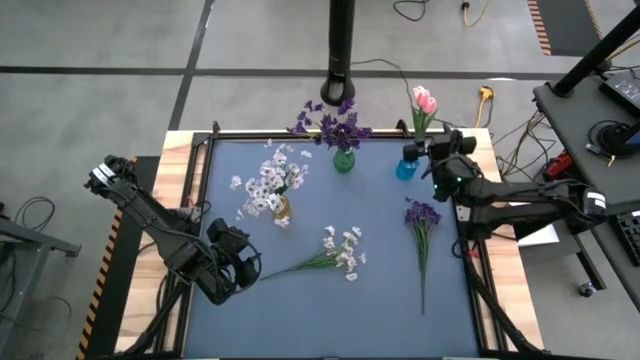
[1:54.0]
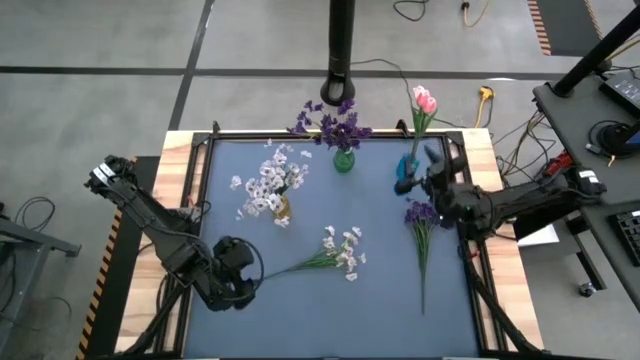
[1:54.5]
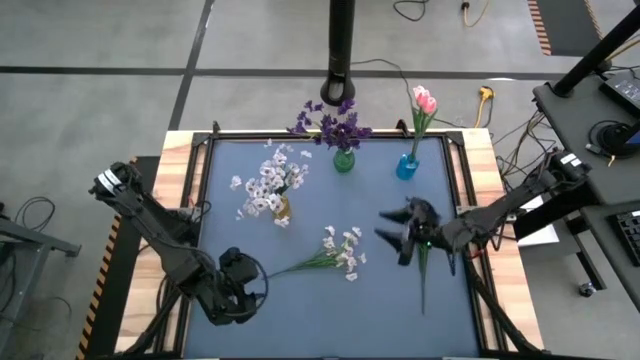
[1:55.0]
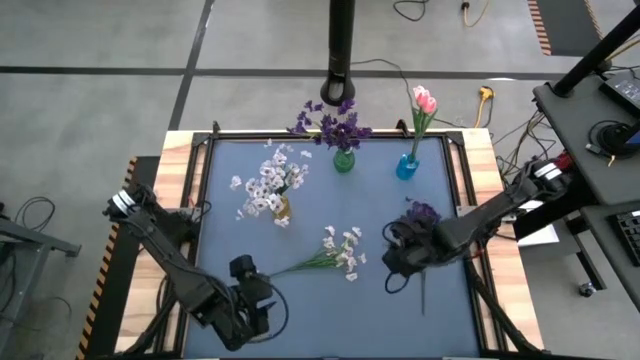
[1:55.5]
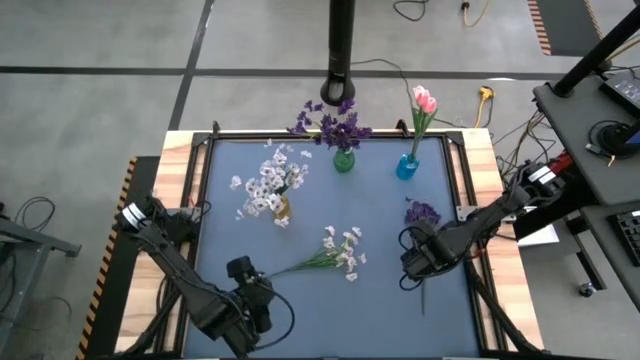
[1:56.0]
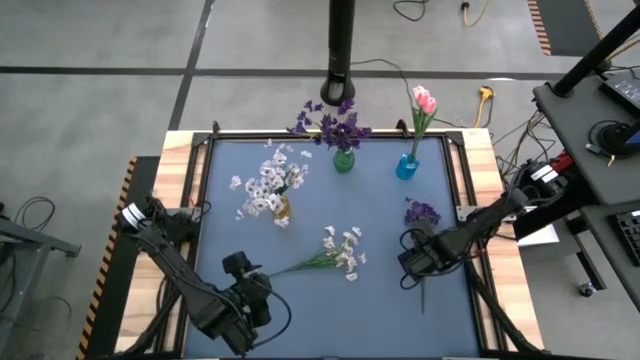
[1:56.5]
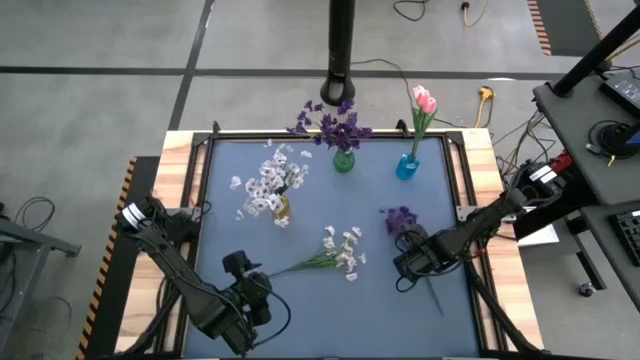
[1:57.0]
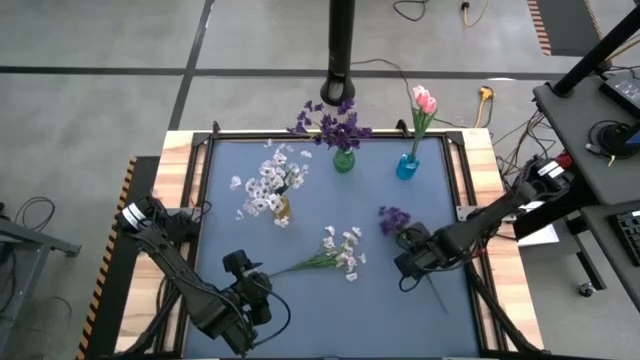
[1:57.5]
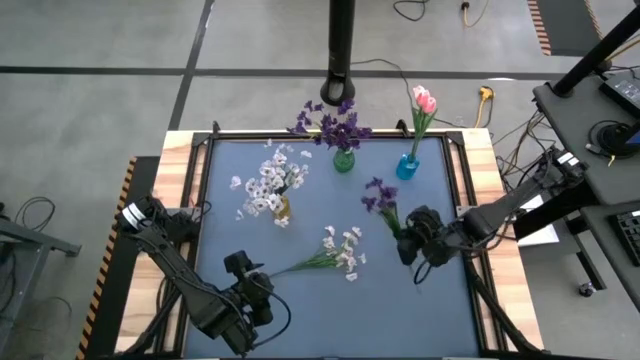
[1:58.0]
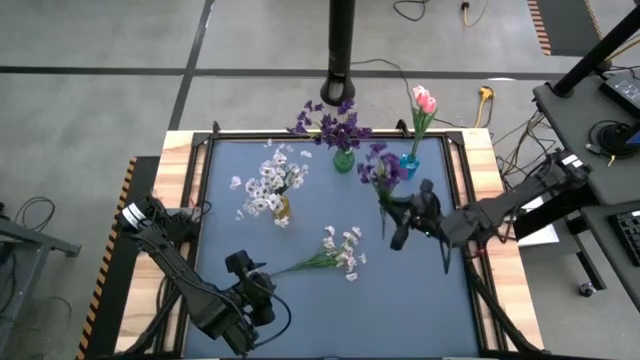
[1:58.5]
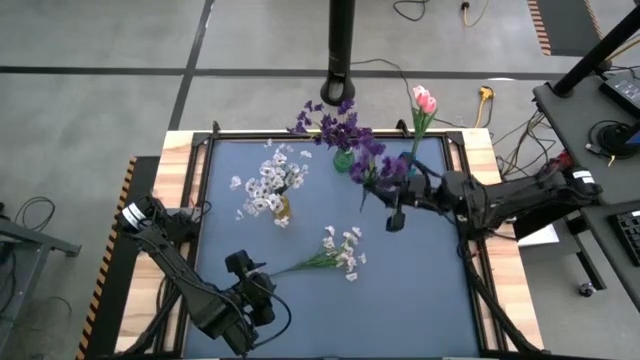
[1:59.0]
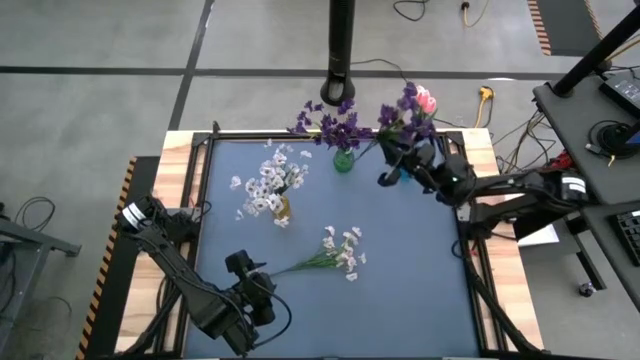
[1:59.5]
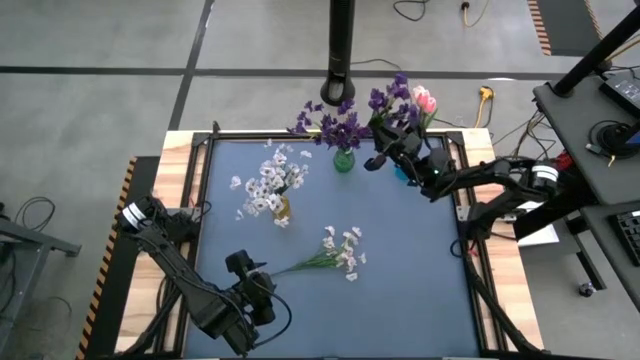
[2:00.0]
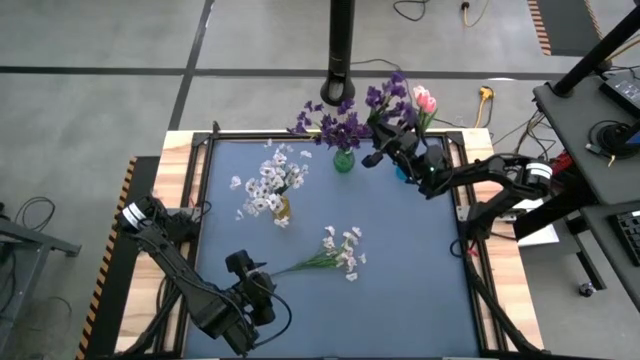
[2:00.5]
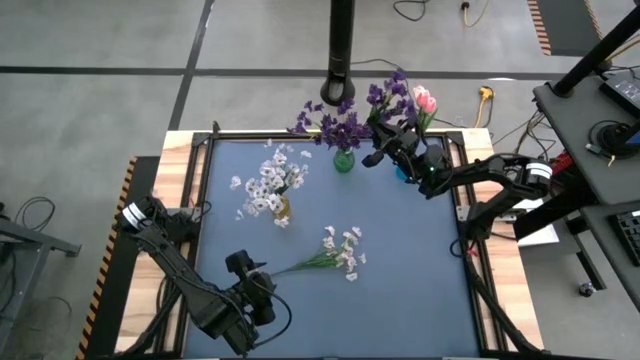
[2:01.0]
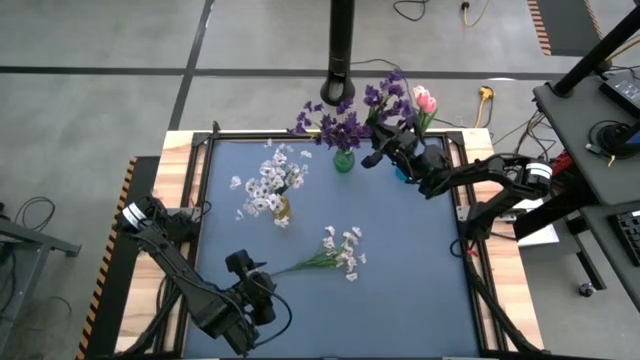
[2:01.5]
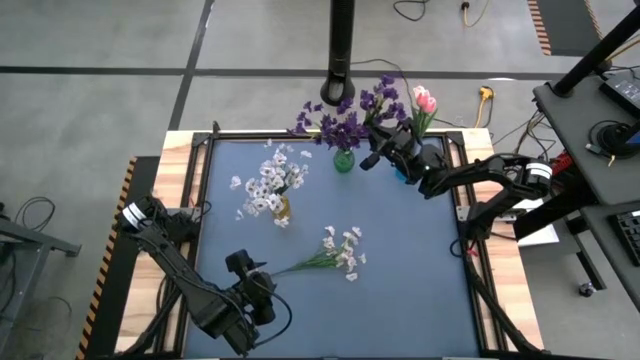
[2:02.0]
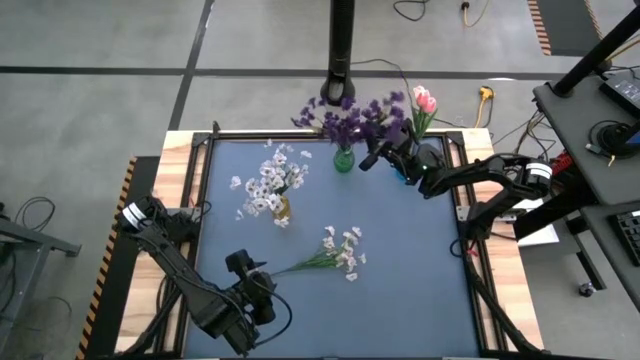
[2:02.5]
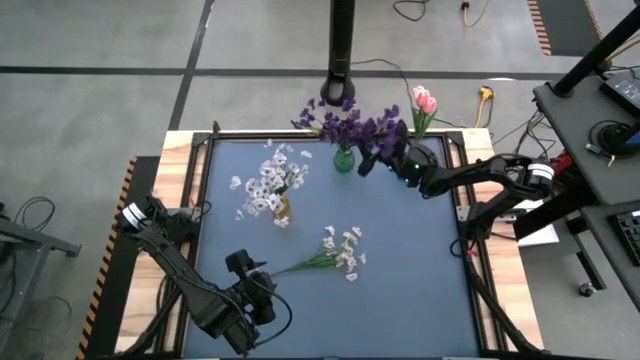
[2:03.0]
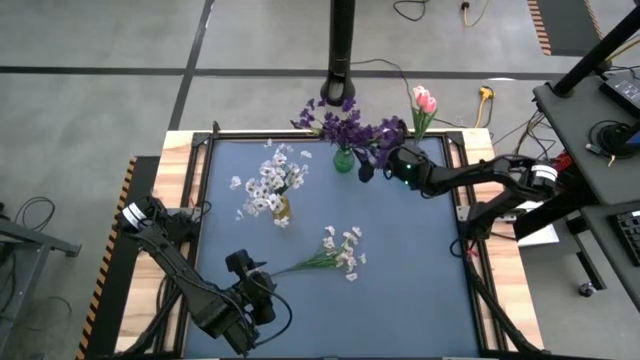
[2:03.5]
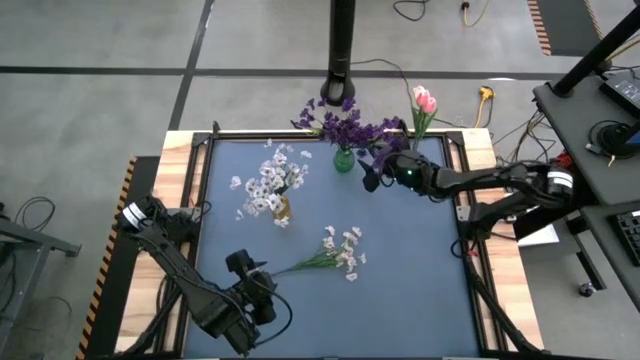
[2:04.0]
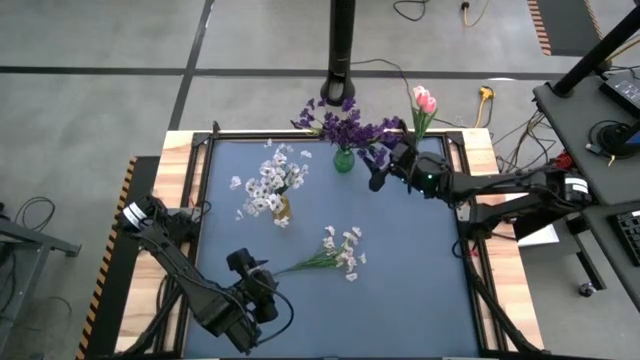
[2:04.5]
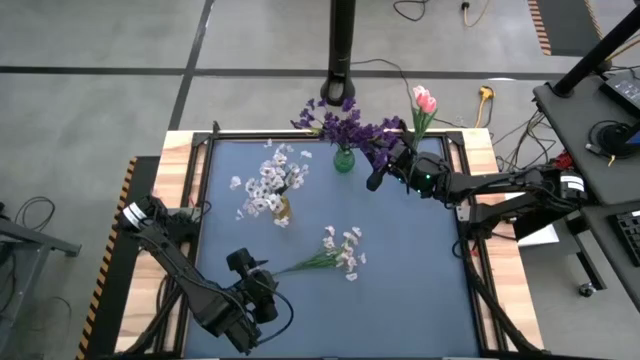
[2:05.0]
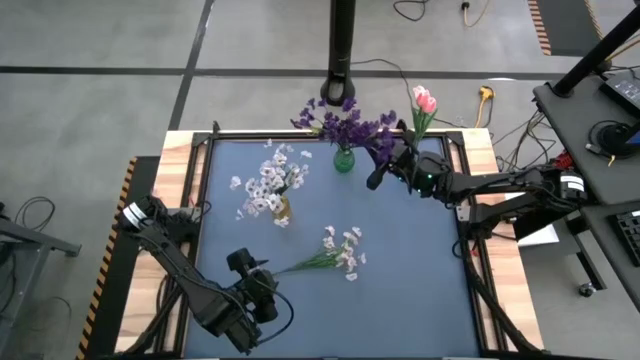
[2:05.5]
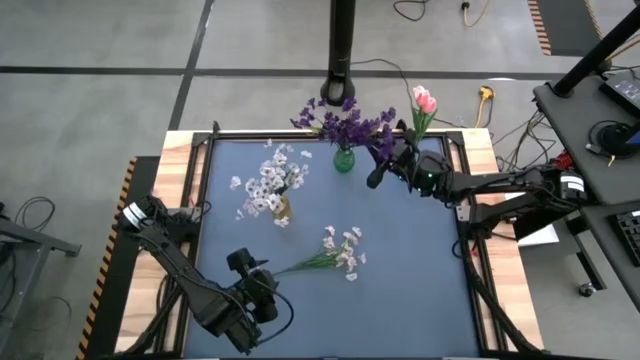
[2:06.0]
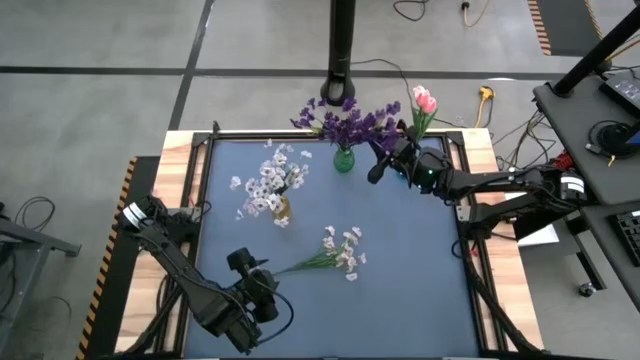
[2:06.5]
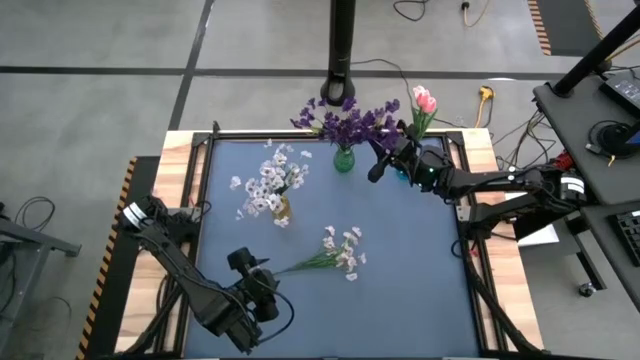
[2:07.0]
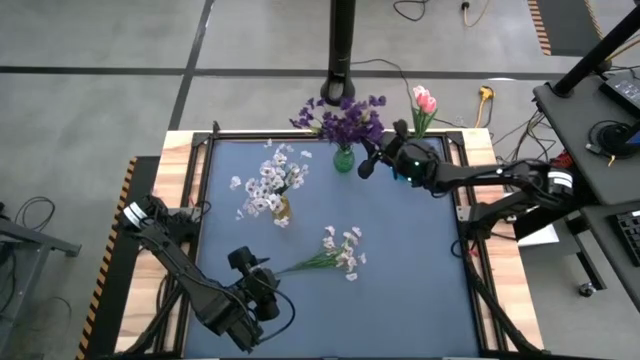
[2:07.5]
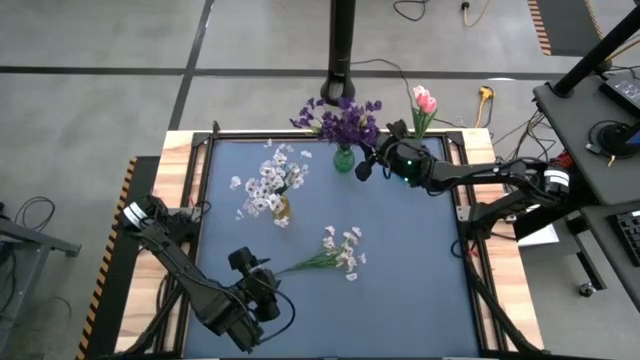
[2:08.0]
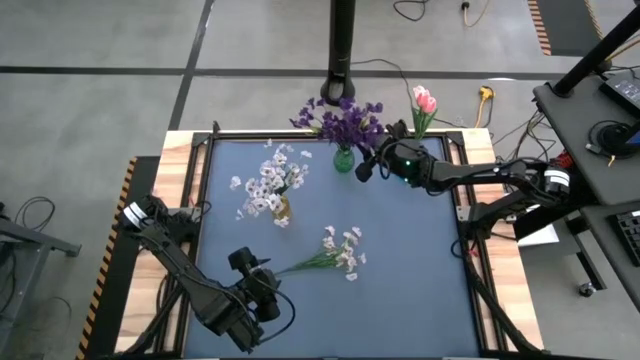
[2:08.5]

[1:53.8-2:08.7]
Task: Sort flowers into vase by color
Put the purple flowers into the green vase

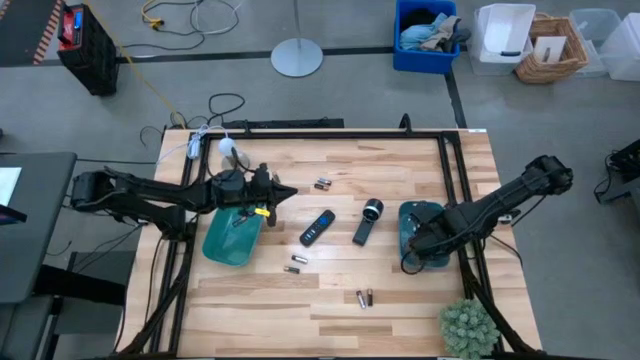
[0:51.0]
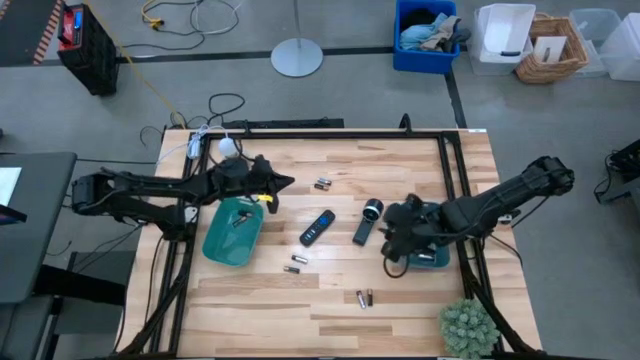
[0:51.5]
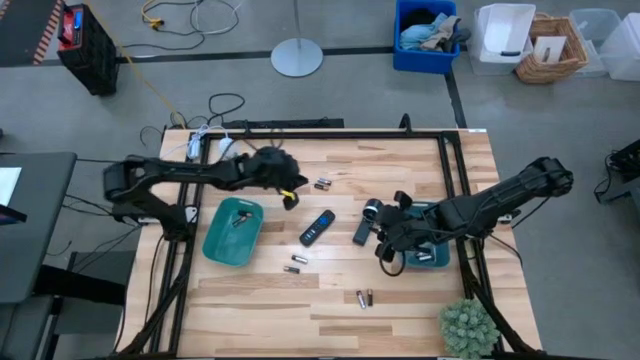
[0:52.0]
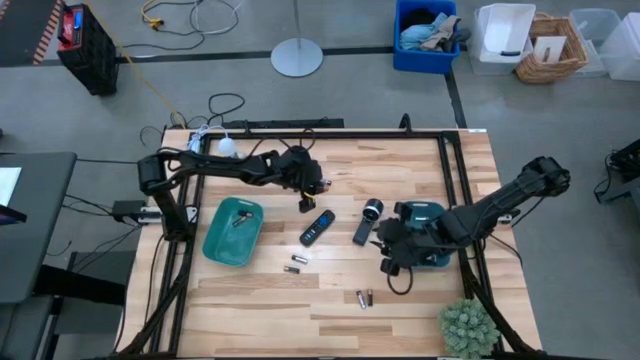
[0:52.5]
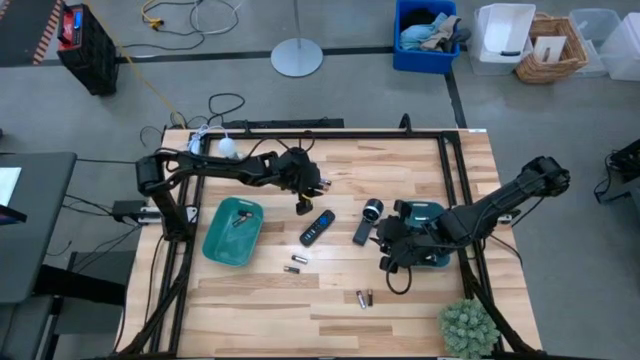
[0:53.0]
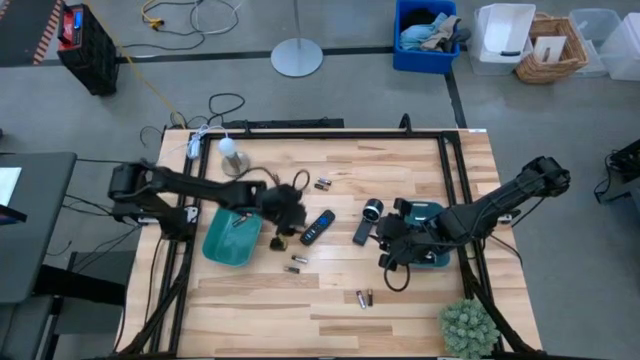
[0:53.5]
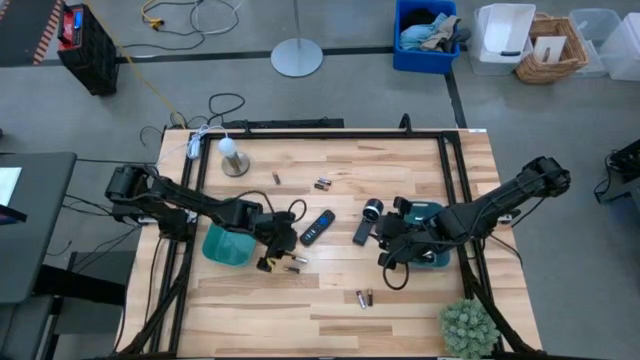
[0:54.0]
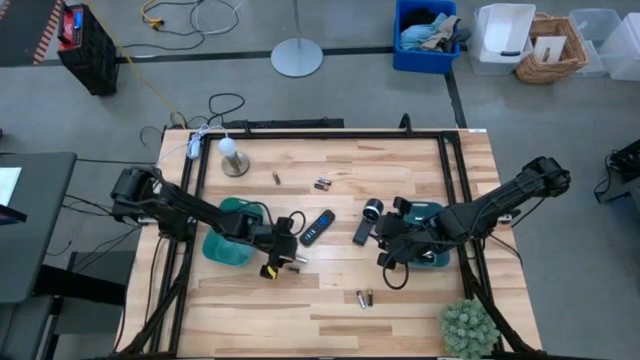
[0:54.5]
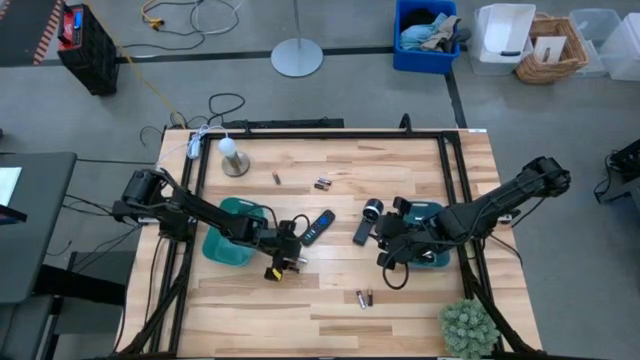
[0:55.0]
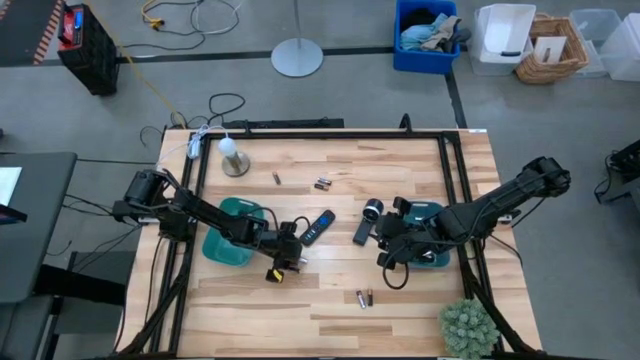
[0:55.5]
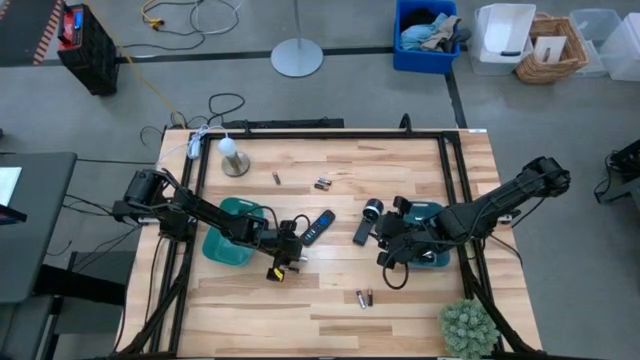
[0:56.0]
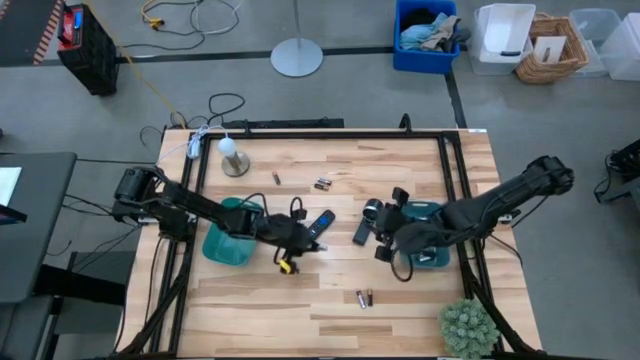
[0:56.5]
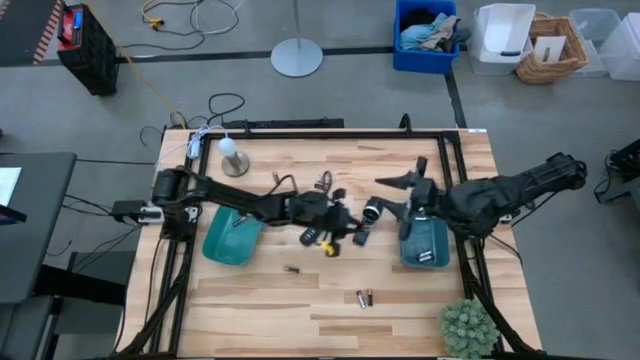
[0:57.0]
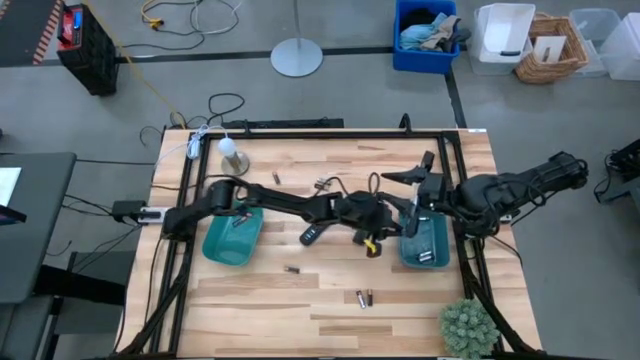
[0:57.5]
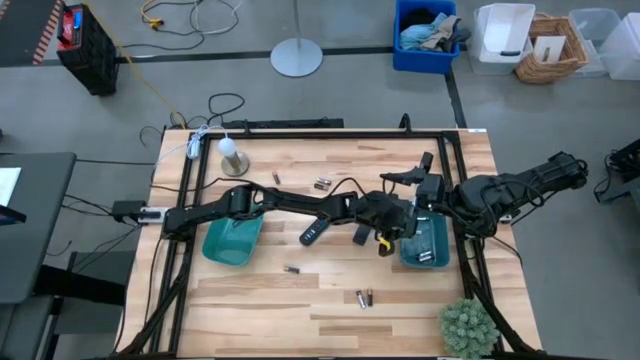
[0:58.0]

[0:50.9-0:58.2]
Task: Sort batteries
Put the silver battery into the blue bin
